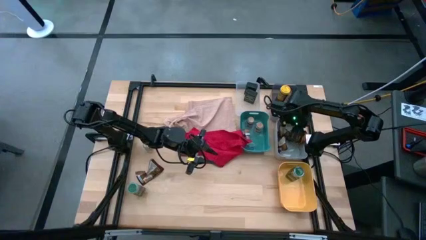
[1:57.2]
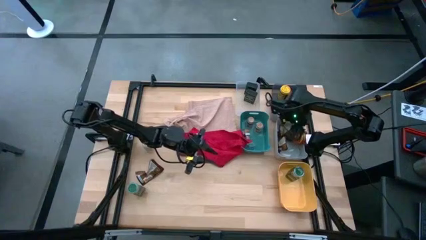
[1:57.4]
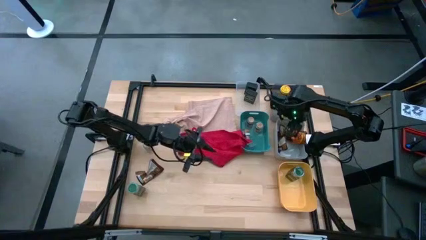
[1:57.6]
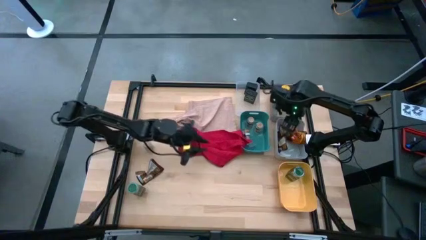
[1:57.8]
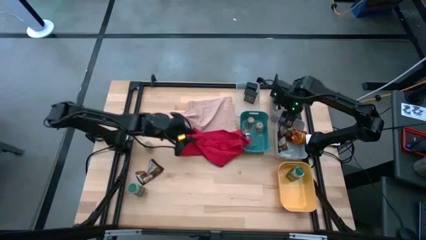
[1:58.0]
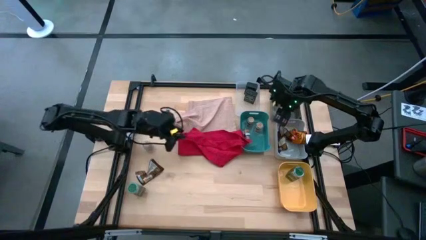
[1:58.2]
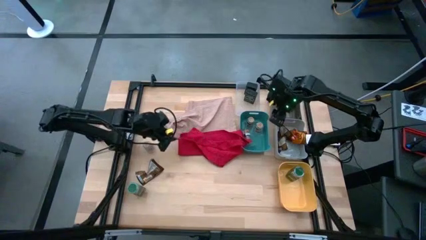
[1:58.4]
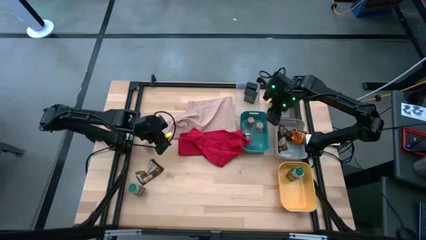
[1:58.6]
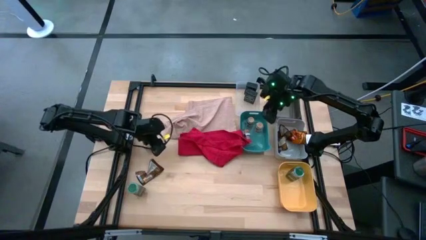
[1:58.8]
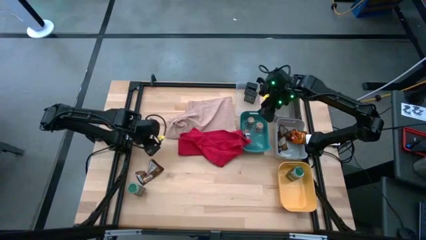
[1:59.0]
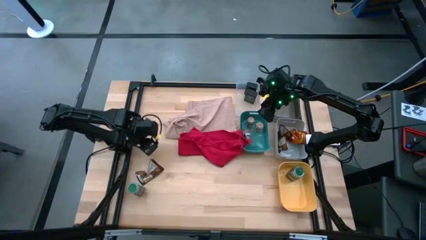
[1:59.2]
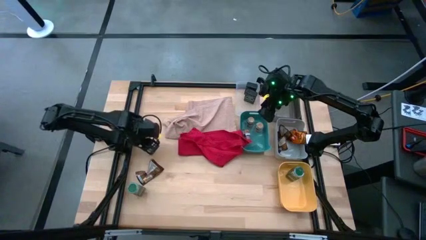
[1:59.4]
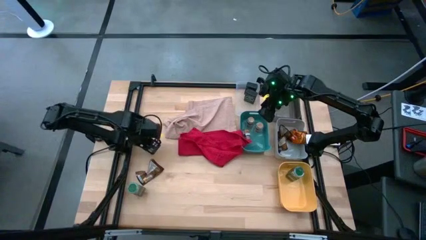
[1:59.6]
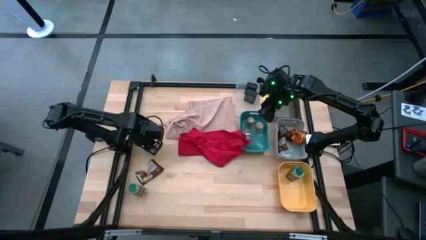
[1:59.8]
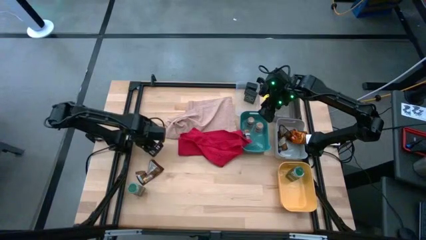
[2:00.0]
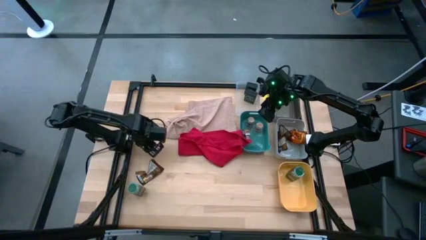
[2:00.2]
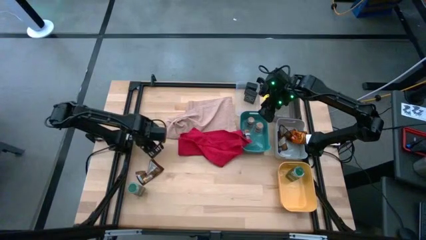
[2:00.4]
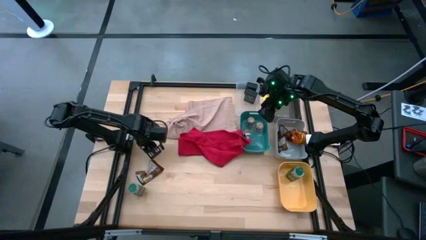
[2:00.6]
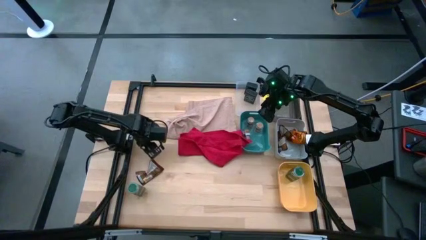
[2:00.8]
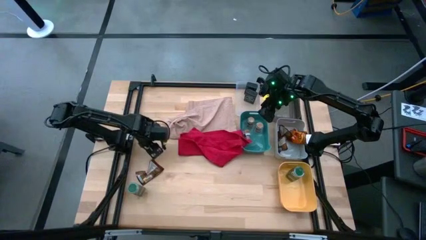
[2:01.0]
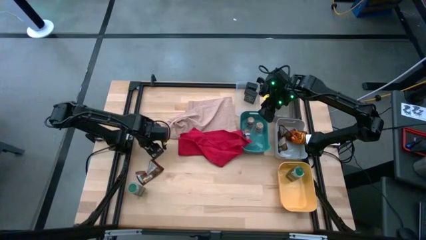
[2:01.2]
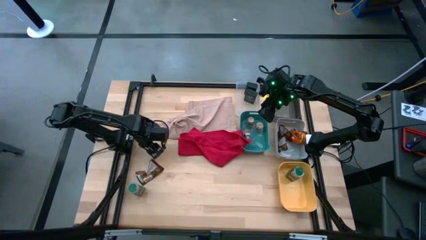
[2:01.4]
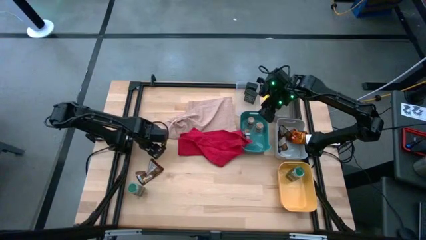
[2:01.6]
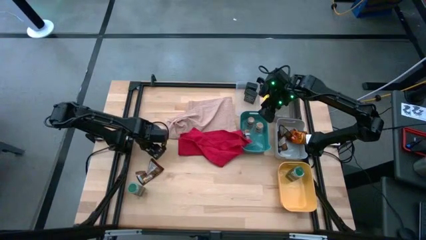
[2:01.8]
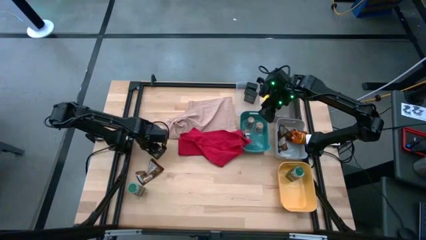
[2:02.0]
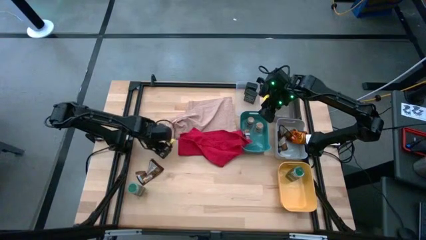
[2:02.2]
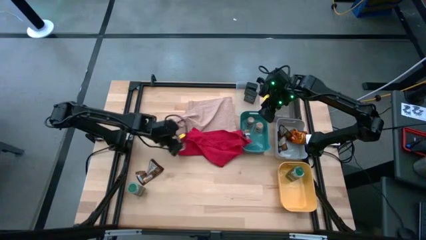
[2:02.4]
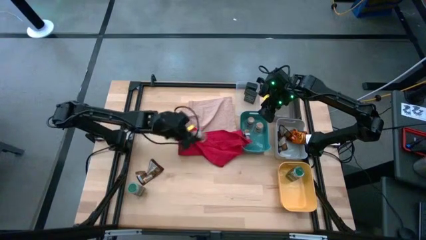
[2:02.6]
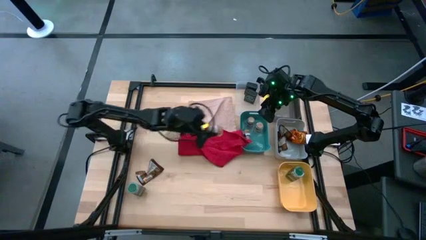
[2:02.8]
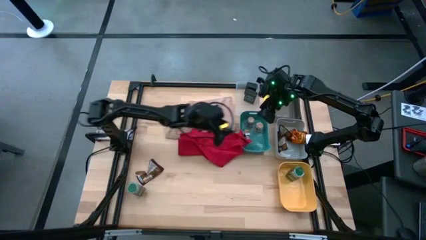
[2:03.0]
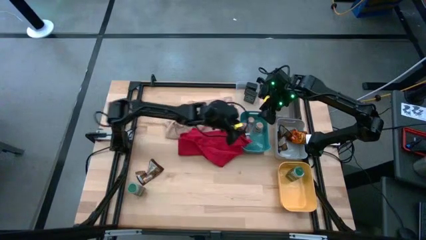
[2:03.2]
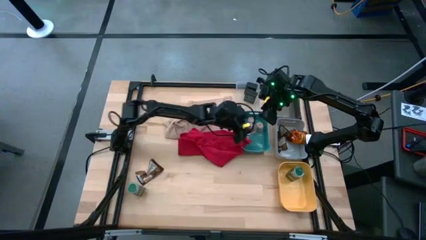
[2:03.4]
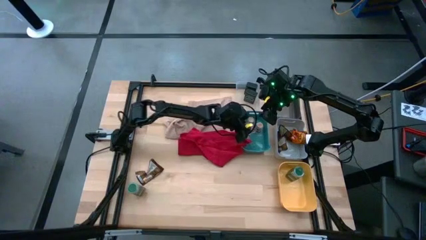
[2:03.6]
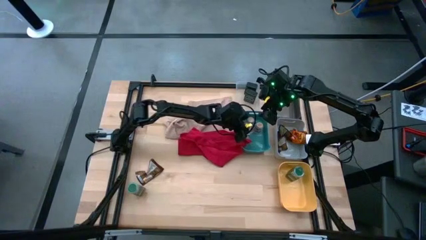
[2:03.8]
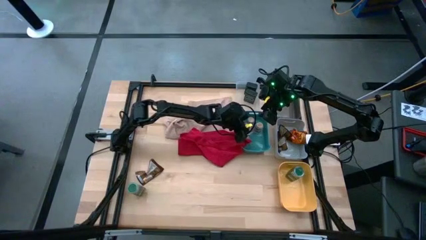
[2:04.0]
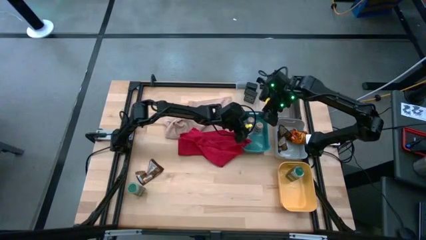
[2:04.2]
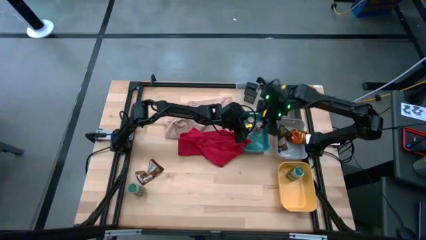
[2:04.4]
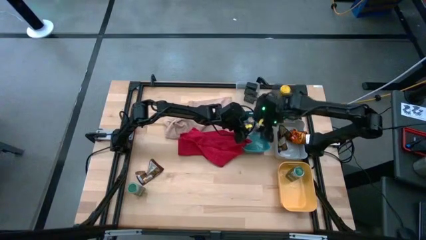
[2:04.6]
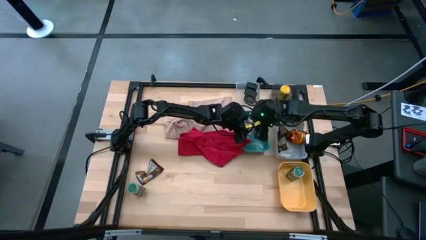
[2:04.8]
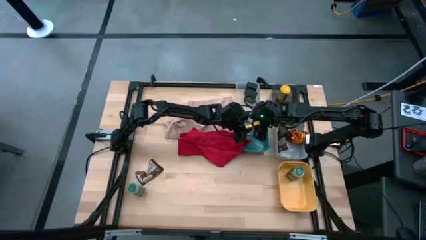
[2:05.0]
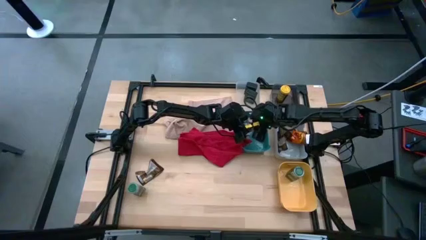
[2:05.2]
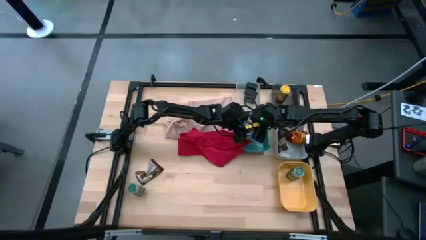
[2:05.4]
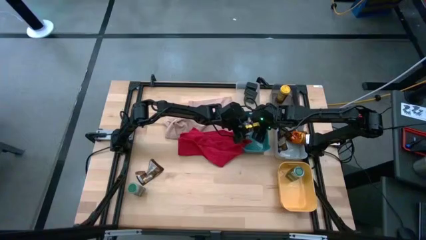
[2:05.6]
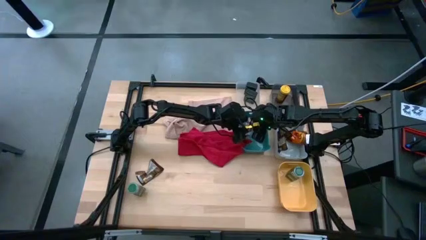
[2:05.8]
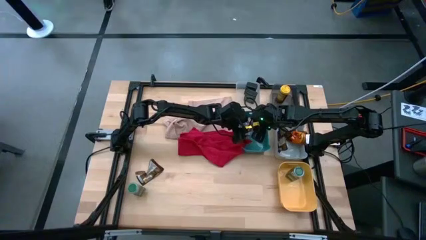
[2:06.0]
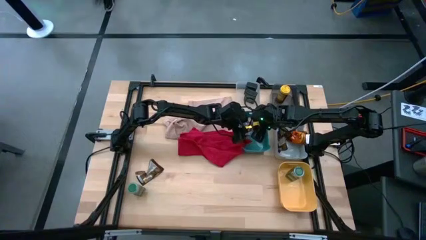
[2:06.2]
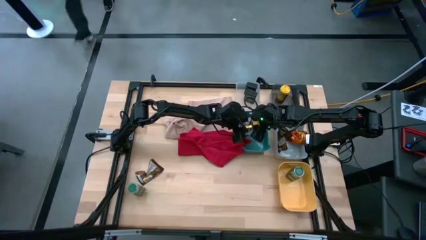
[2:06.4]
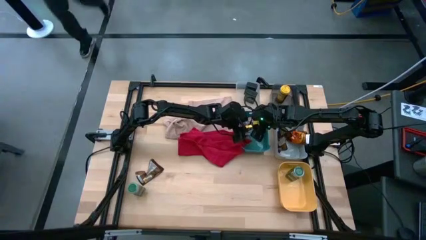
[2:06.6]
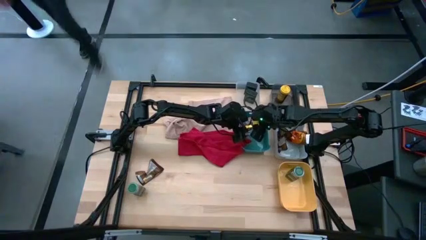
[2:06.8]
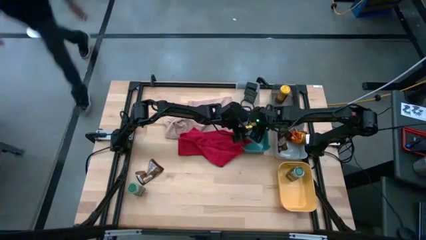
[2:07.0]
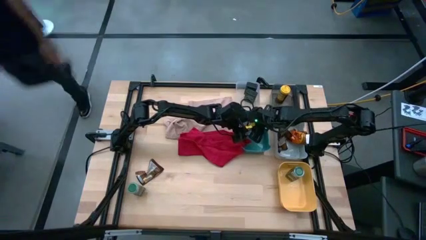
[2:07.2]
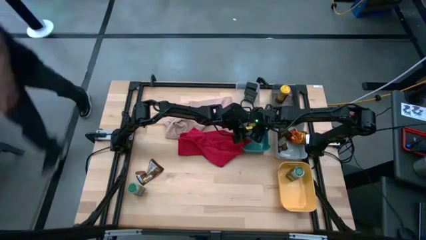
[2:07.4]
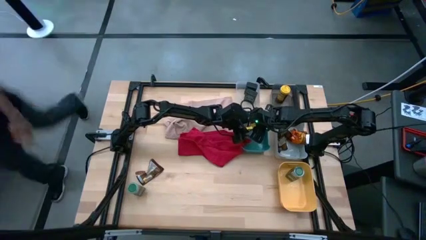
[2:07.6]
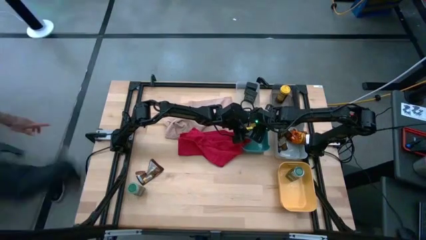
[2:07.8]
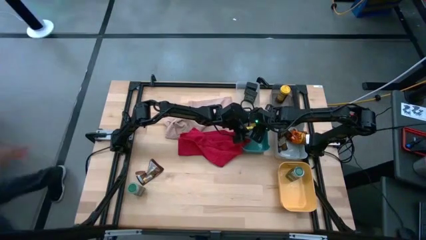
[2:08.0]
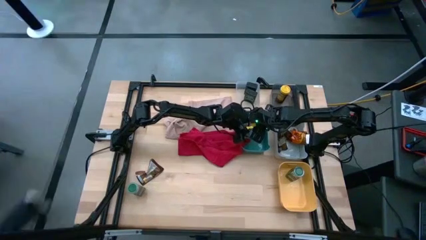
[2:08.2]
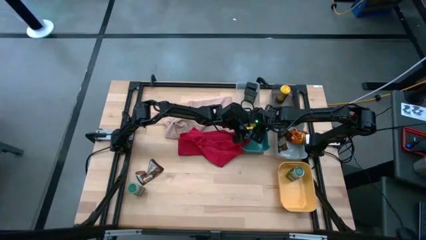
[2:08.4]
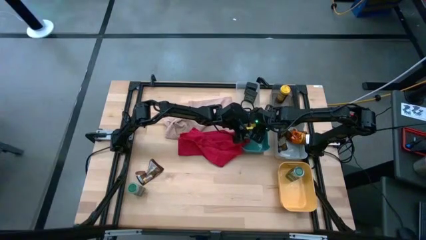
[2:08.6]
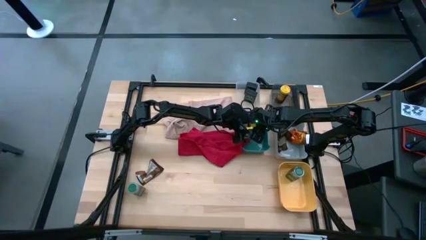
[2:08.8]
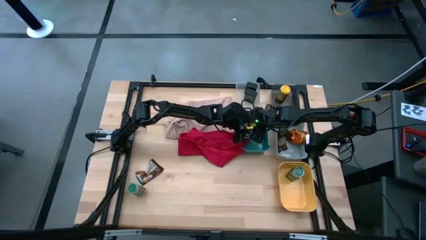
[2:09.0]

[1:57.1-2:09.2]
Task: Sort spices by type
Put the transparent seasoning bottle into the blue bin

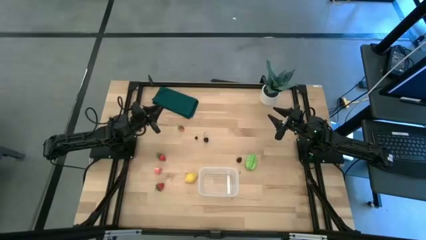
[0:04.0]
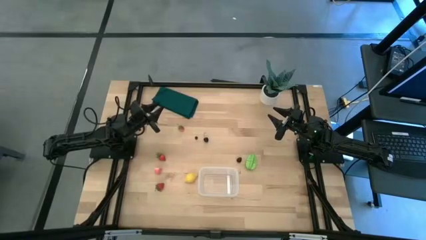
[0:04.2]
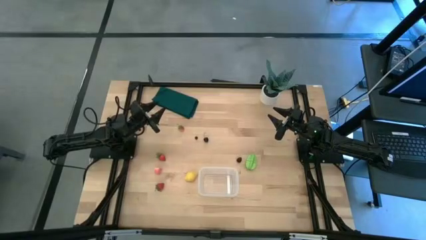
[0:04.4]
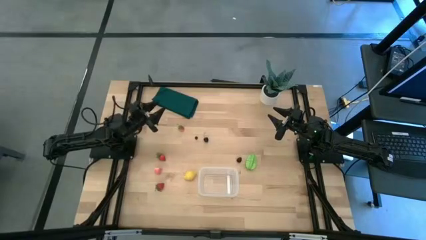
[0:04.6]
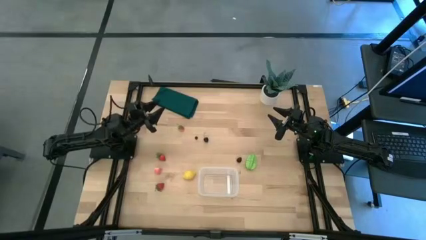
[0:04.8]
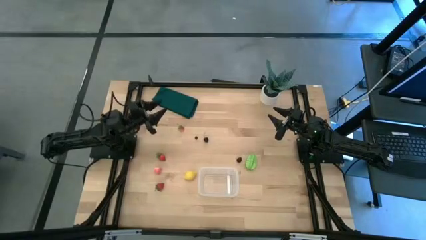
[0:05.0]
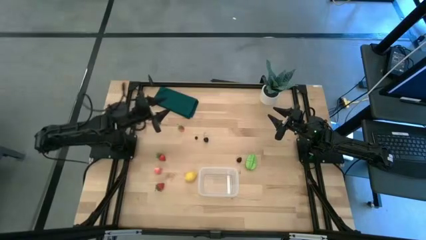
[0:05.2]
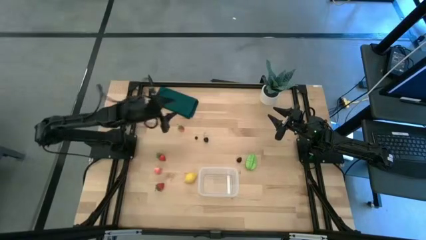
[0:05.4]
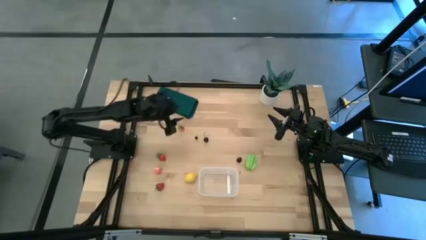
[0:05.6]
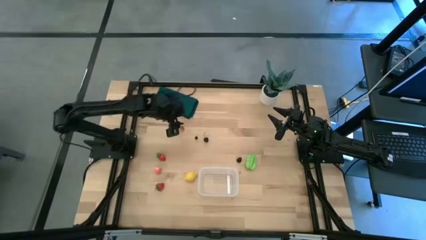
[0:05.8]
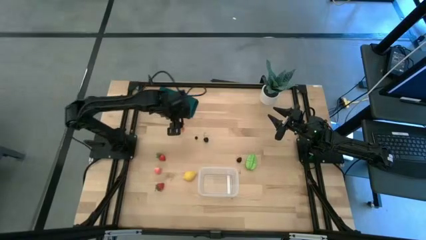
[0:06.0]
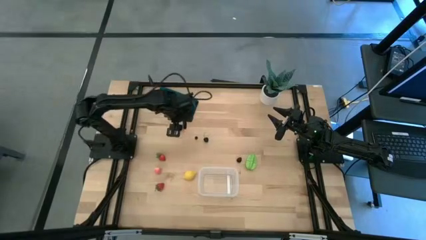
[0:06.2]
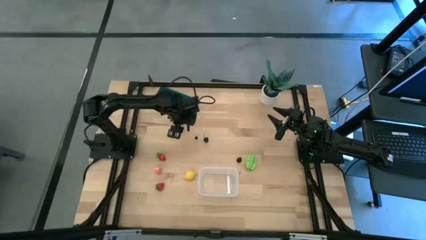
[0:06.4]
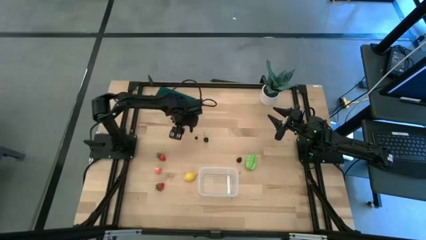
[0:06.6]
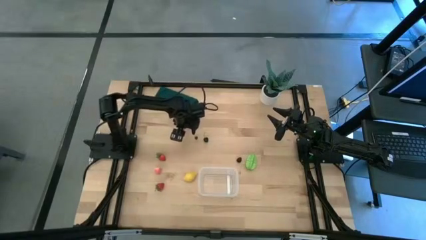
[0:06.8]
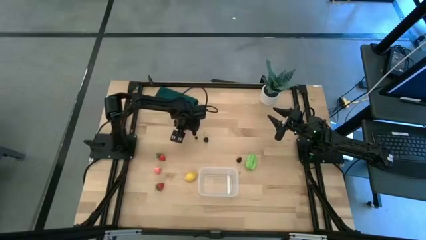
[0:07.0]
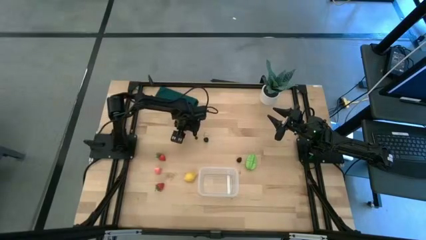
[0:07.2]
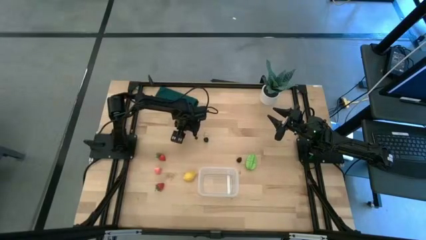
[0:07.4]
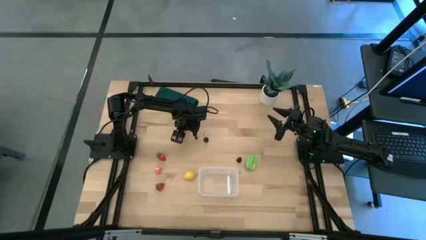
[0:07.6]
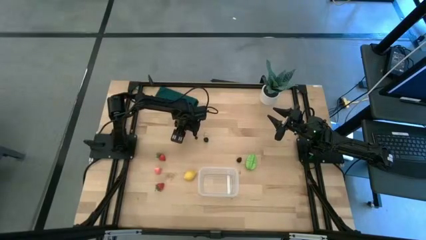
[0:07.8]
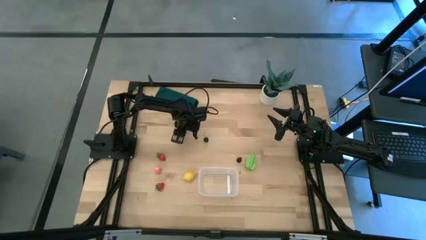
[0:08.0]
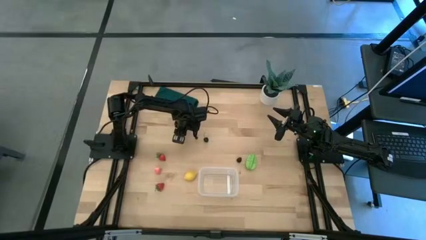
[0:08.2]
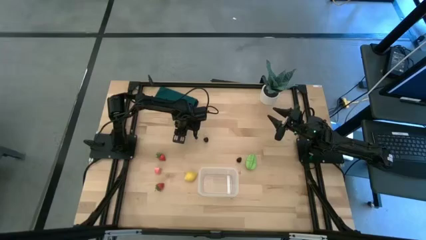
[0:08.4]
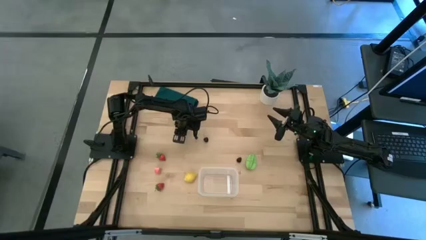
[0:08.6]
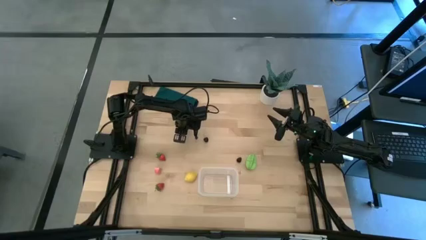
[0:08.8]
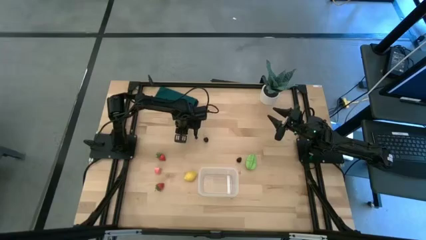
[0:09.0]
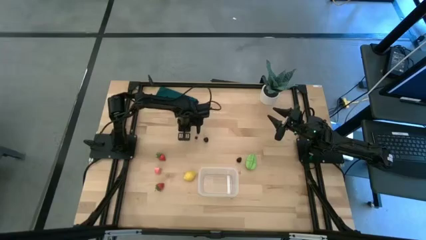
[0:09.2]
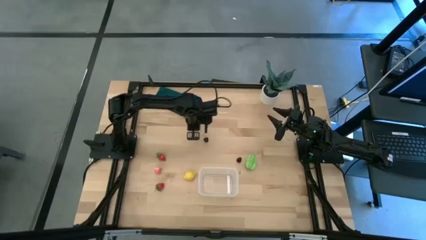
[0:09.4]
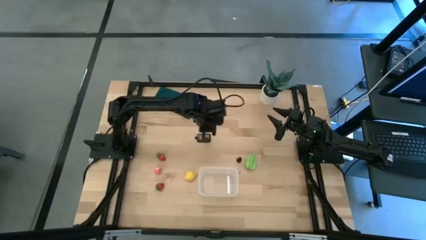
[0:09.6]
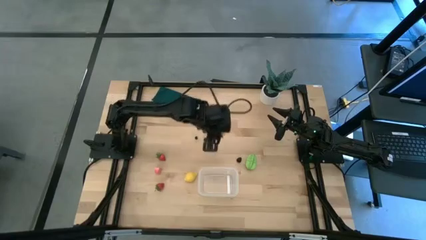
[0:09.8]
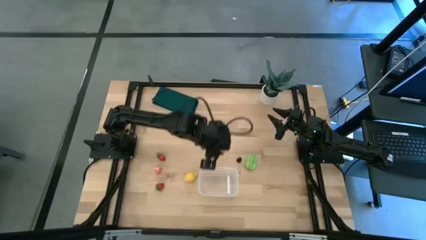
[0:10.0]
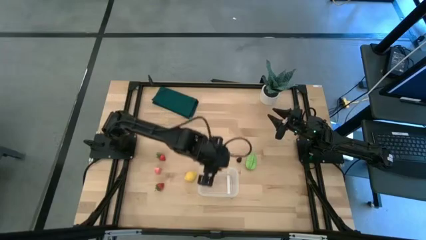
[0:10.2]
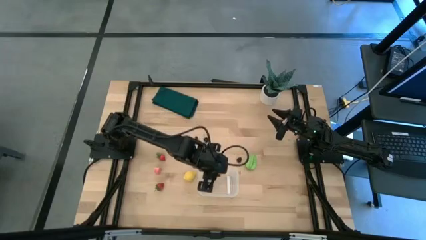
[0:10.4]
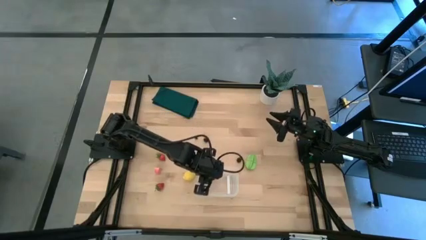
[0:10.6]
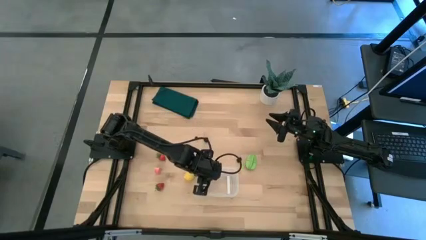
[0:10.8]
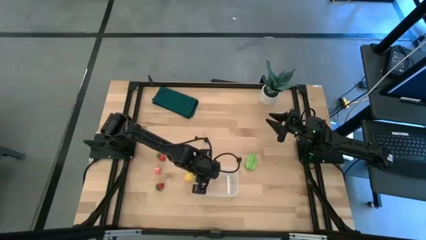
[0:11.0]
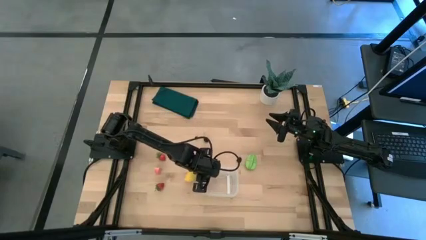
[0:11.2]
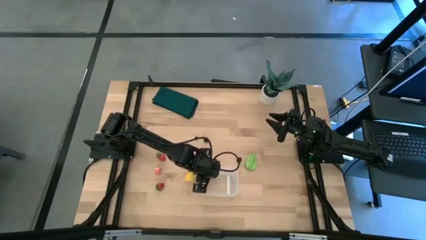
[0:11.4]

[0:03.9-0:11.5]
Task: Pick and placing Produce into tupperware
Put the top strawberry into the transparent bin
